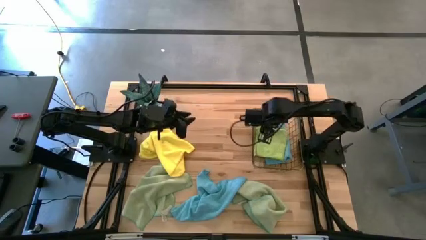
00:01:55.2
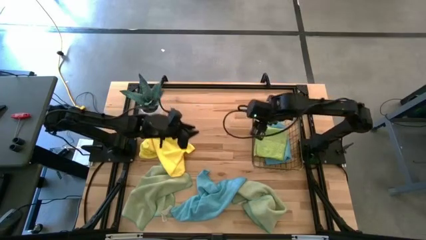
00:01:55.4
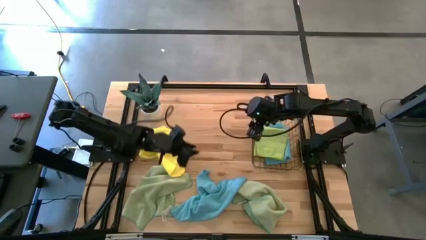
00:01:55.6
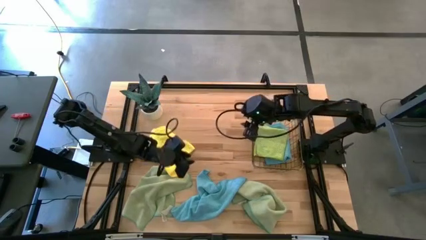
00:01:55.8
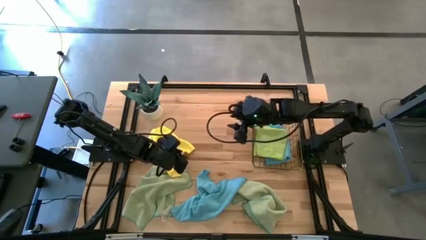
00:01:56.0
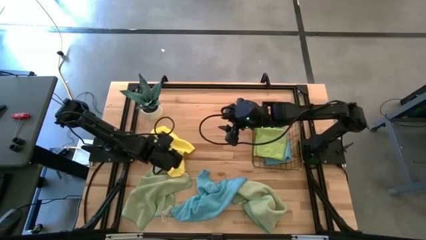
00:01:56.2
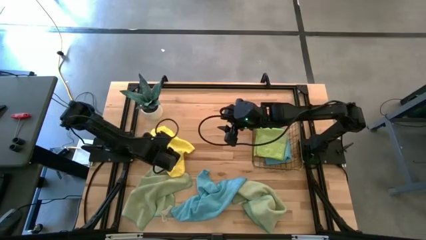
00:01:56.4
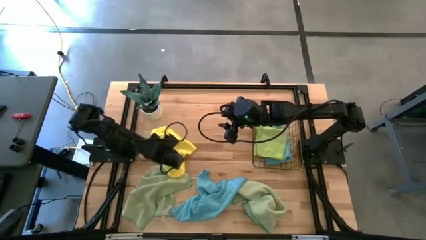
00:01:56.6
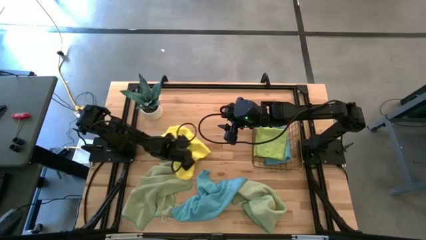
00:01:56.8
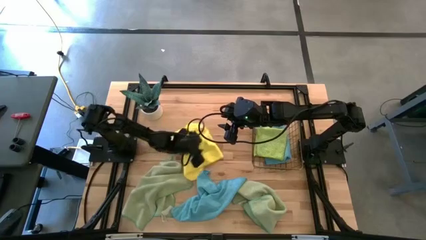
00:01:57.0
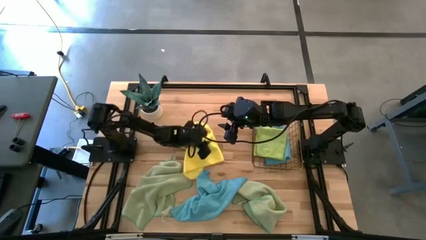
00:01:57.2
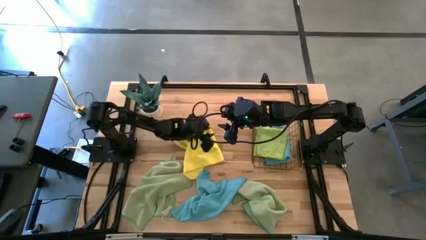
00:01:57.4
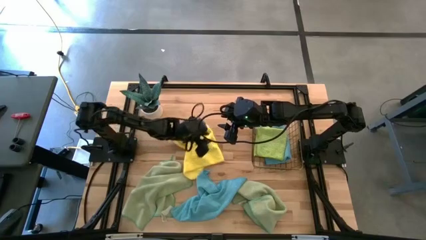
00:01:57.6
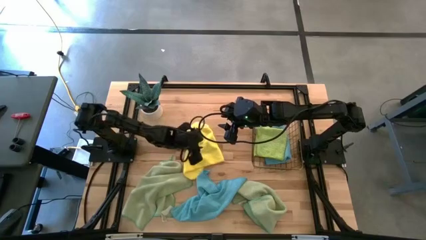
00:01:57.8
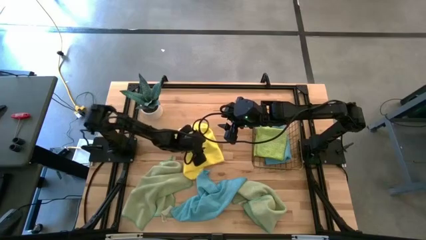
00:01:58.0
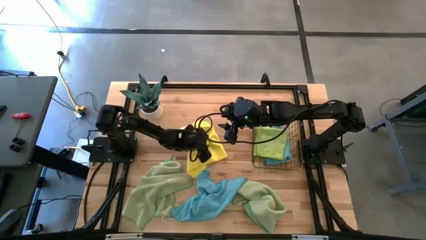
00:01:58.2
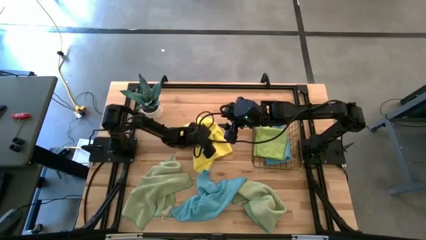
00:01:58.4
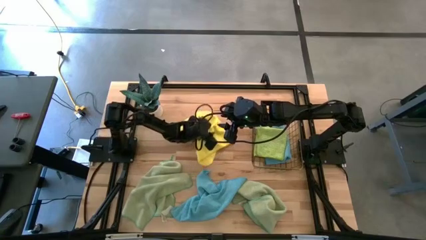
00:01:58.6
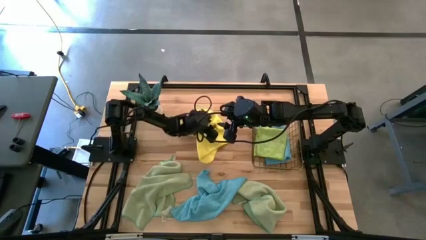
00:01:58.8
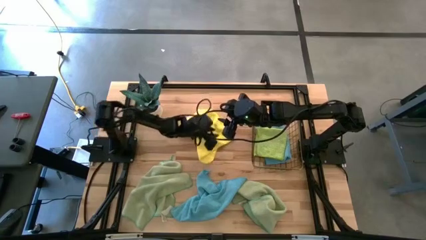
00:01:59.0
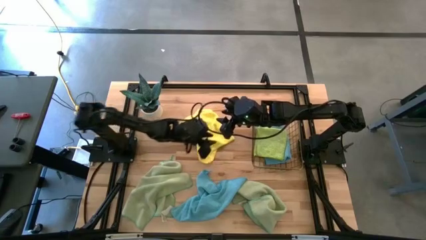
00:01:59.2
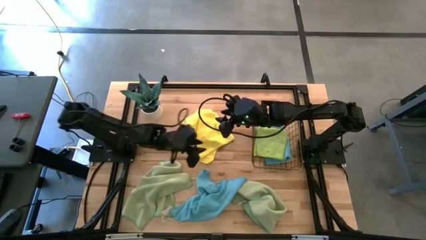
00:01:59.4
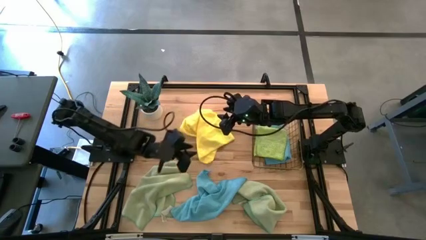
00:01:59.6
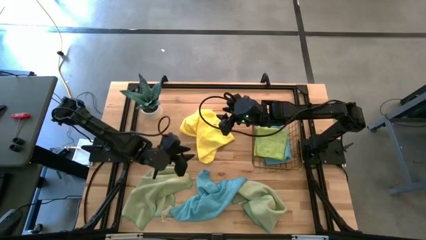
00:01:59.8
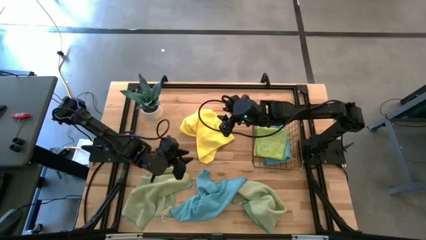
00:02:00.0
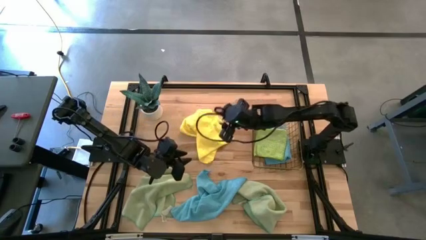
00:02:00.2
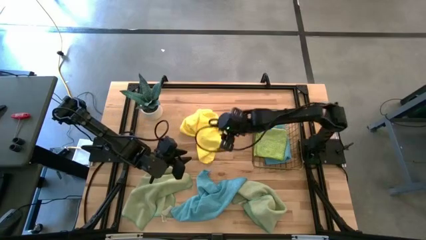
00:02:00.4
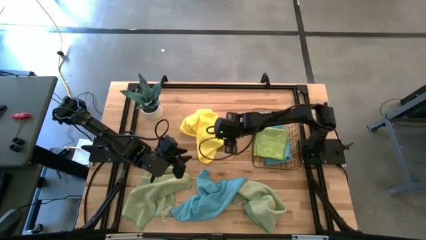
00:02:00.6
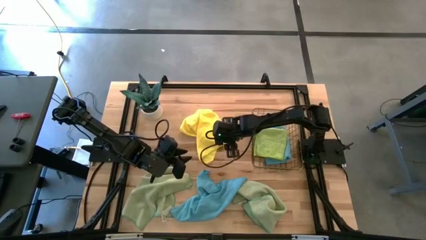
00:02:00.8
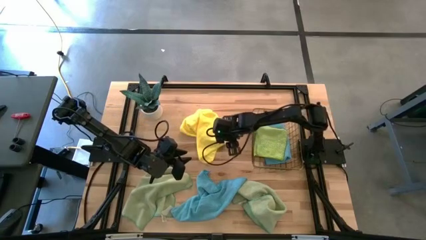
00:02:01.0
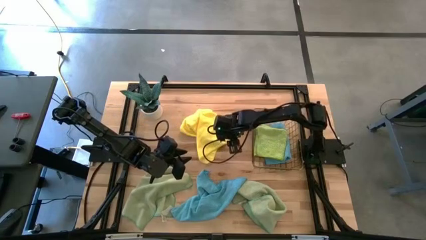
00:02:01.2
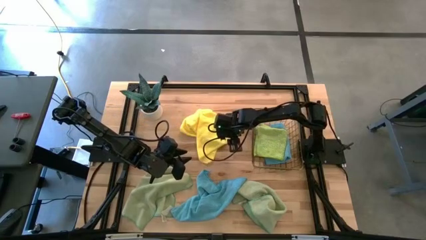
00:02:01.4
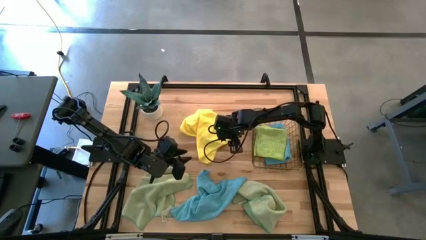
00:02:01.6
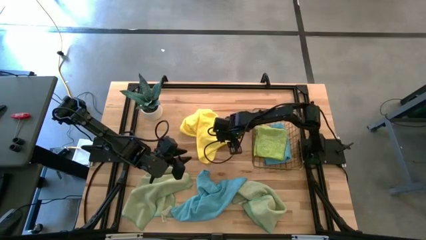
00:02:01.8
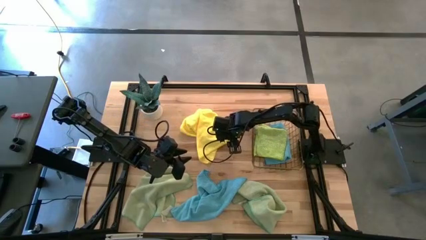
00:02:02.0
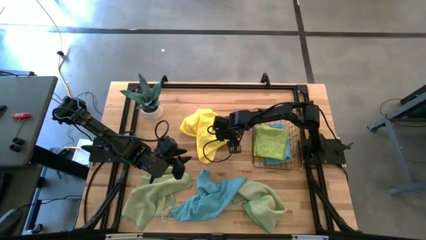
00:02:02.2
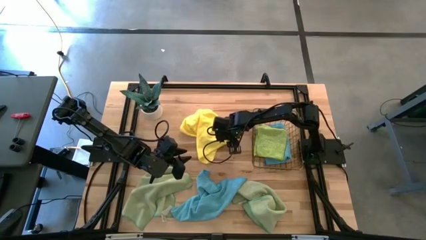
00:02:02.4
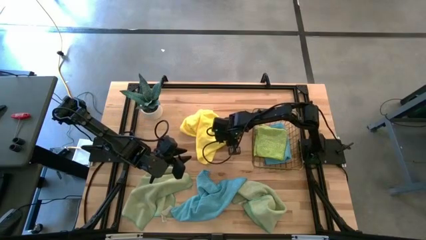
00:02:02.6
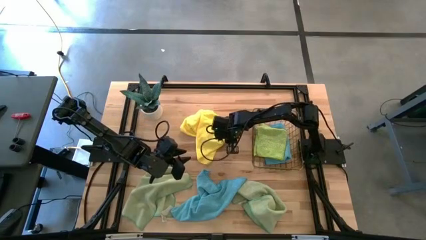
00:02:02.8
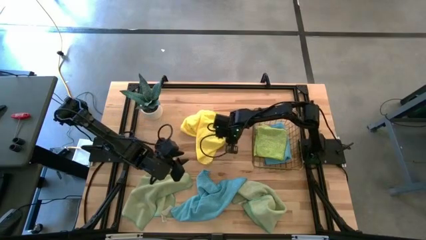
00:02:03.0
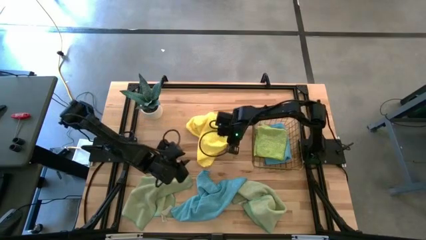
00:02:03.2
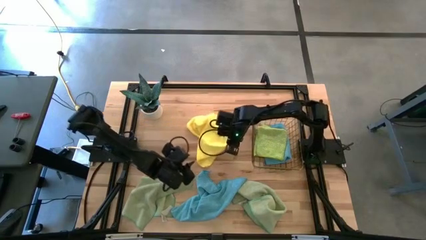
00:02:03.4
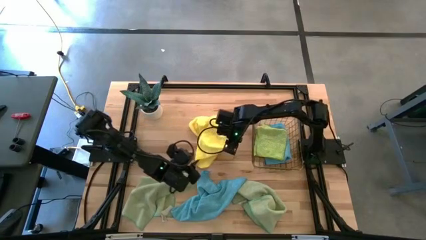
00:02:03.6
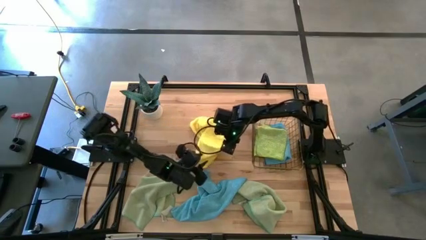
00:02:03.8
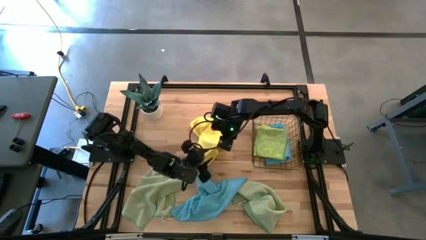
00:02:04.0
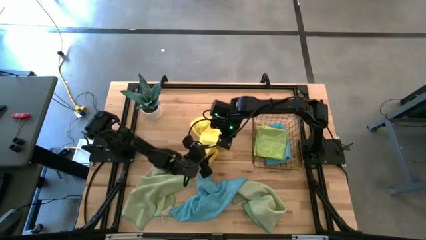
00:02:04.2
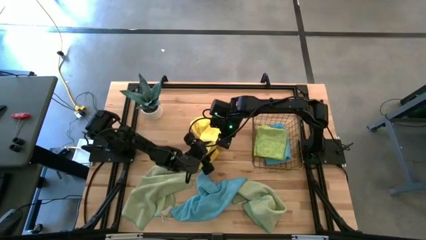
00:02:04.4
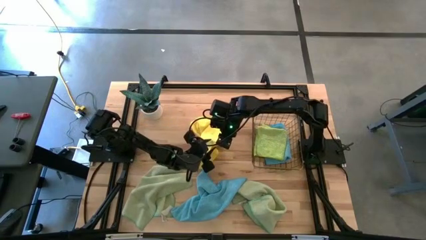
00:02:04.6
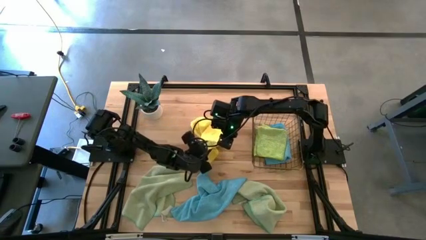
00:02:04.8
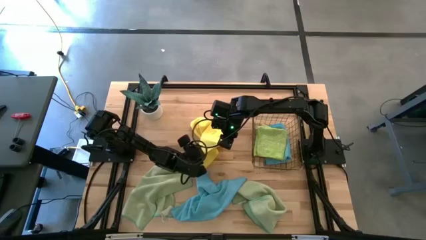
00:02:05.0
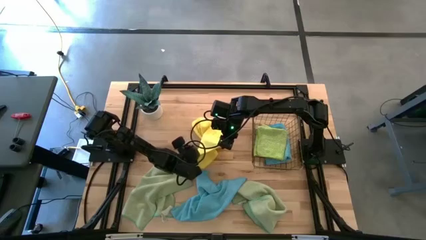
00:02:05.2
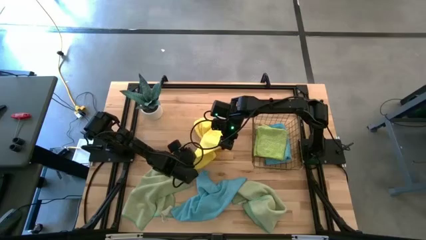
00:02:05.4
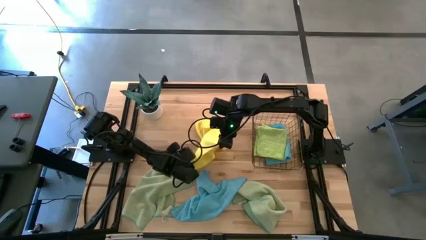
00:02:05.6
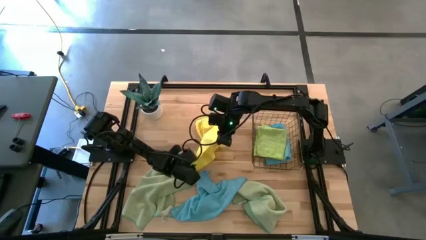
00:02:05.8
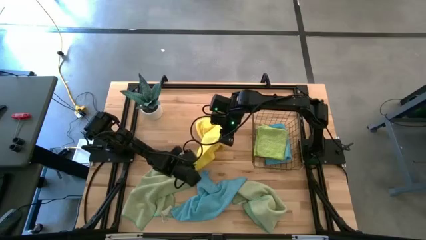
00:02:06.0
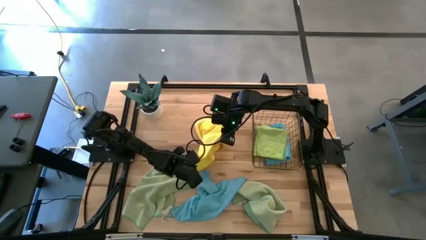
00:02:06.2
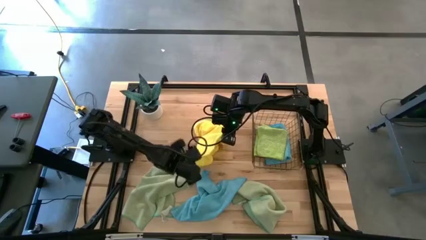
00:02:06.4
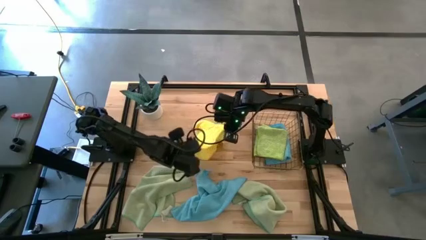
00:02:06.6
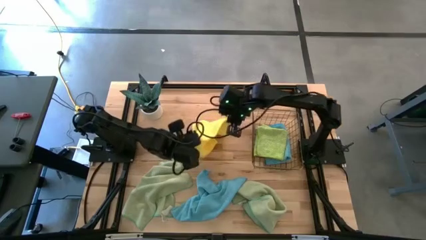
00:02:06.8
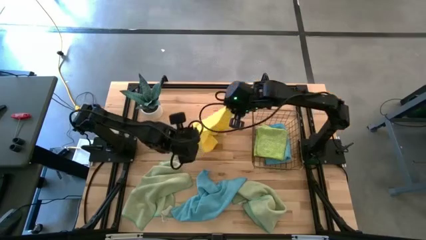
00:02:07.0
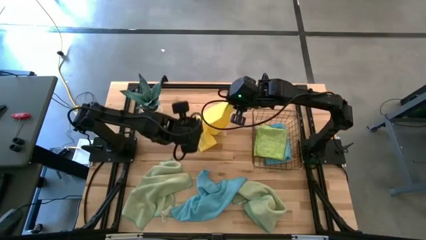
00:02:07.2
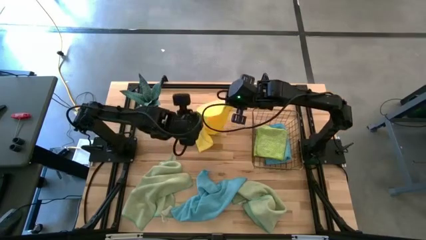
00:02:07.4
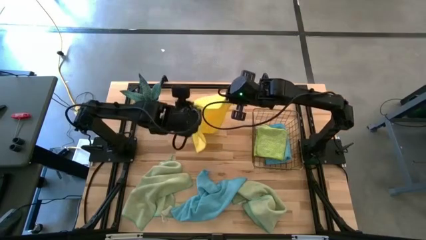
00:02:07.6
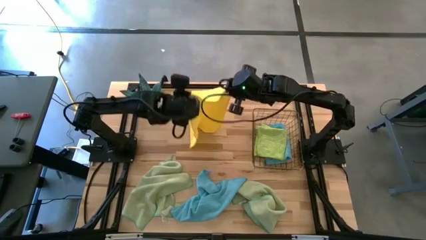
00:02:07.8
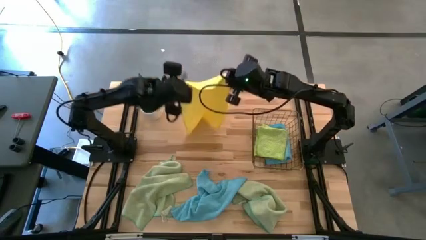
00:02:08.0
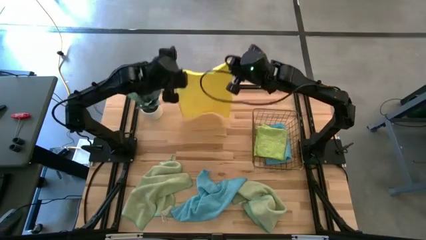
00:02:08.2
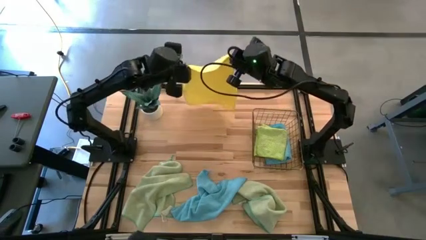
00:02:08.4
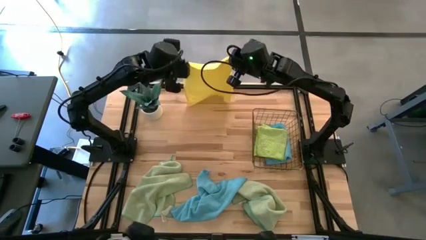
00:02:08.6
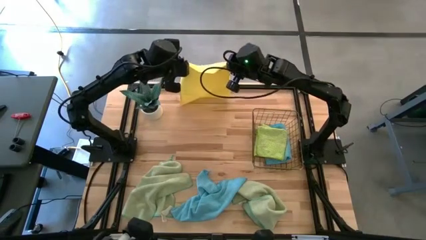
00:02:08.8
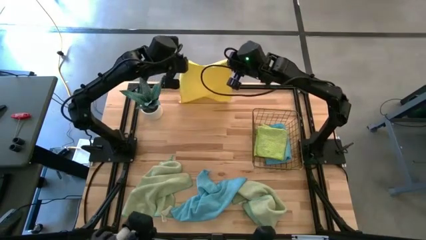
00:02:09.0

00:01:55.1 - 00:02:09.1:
Task: Fold microfiber towels
Fold the yellow microfiber cloth

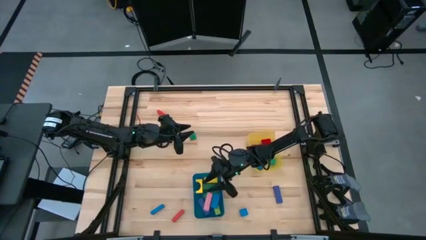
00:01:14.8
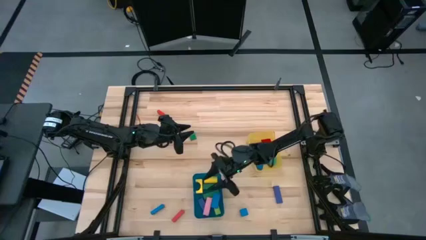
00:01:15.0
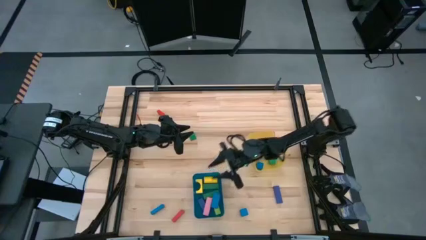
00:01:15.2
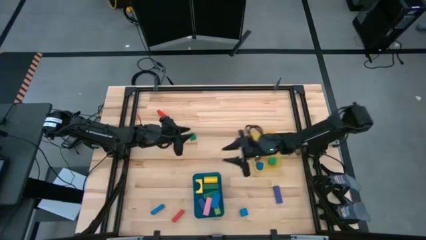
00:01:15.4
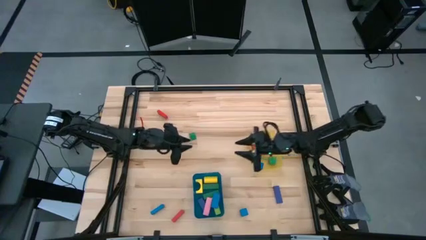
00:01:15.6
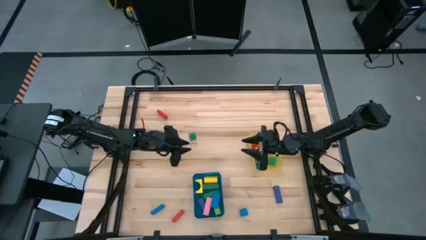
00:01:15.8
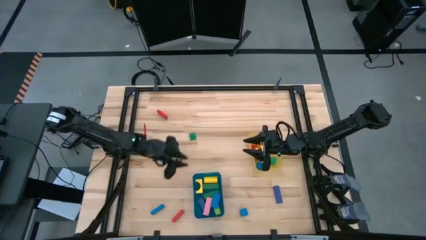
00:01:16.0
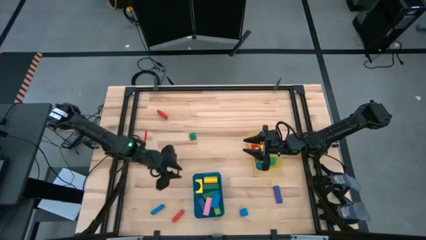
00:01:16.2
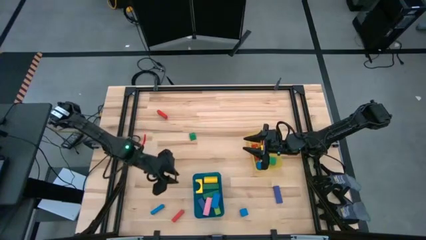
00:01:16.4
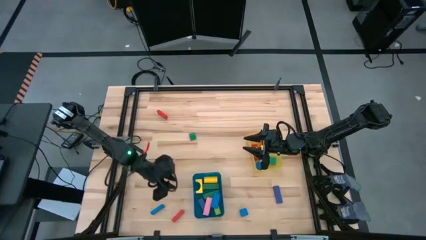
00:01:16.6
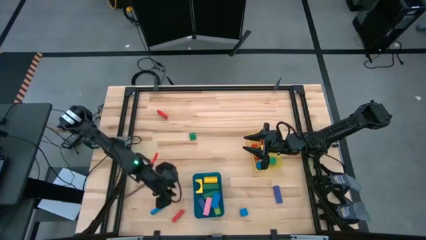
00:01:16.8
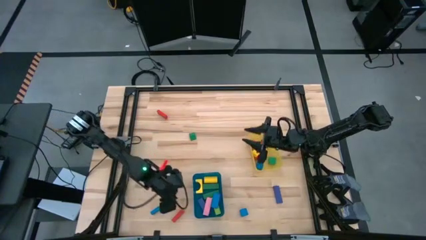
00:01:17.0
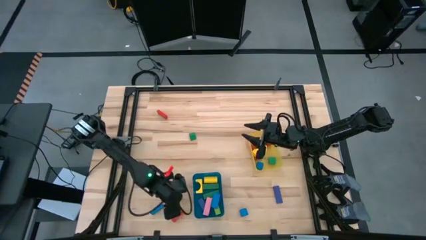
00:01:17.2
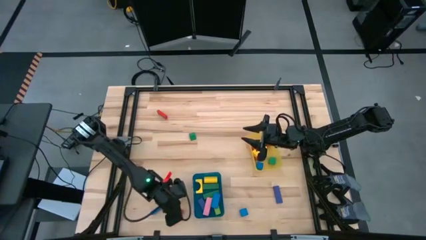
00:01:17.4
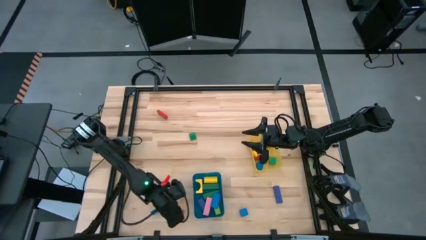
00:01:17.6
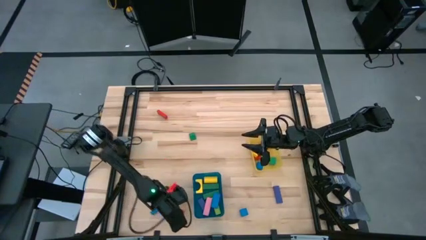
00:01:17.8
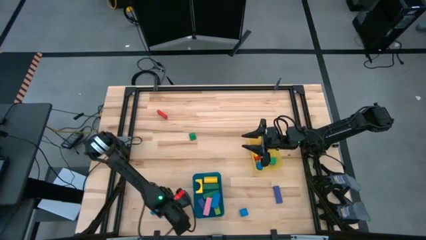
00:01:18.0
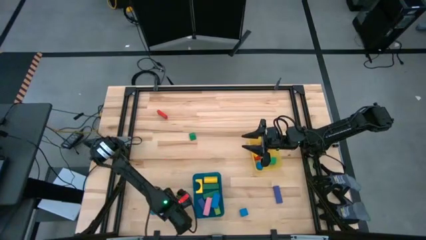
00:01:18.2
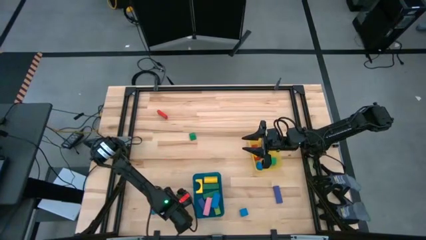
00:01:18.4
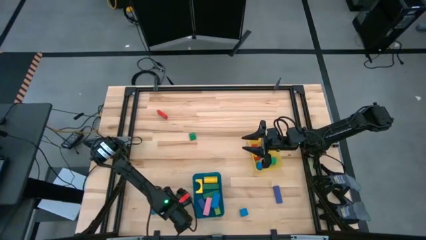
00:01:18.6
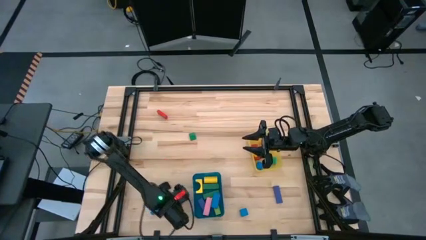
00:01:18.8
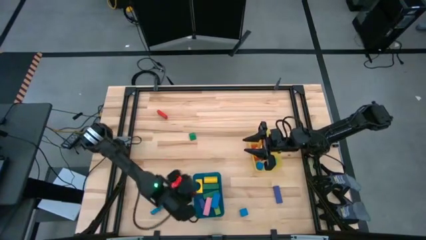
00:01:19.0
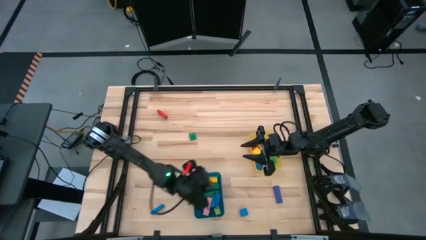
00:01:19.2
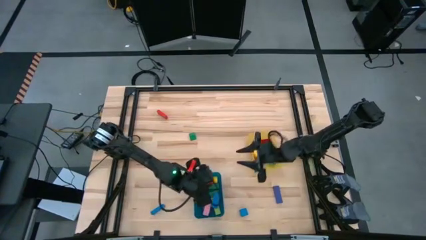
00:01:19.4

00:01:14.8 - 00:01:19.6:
Task: Sort blocks by size
Put the large red block into the blue bin
